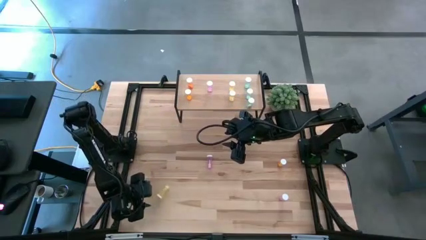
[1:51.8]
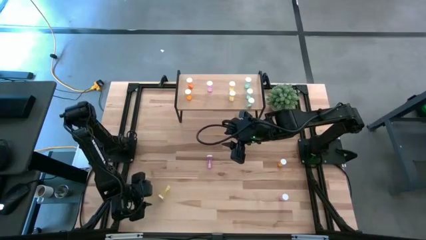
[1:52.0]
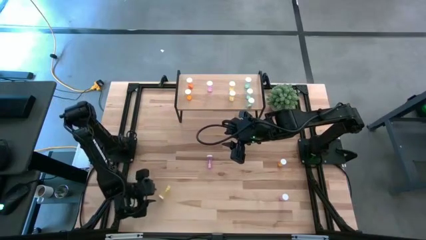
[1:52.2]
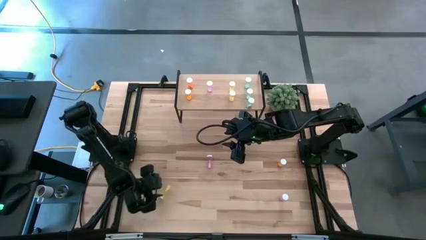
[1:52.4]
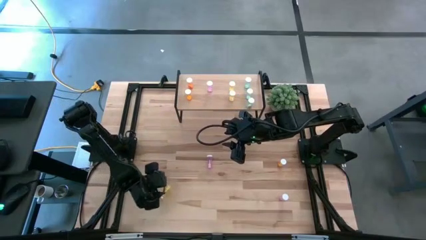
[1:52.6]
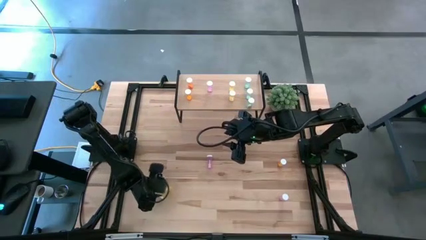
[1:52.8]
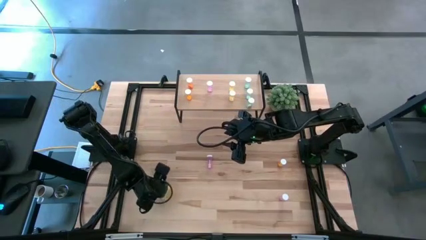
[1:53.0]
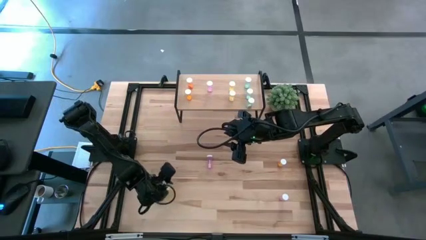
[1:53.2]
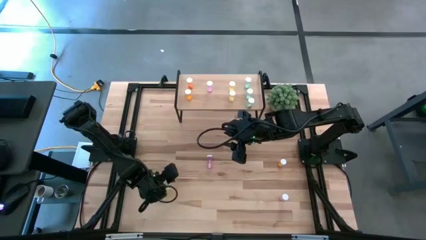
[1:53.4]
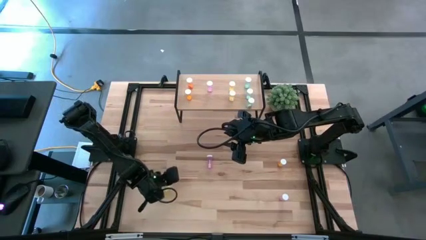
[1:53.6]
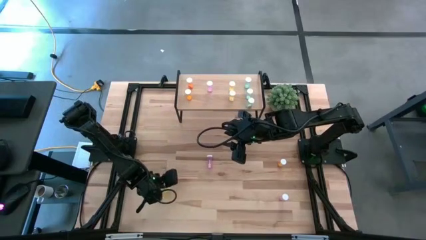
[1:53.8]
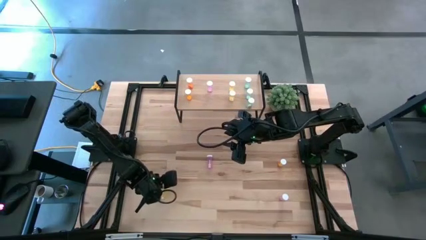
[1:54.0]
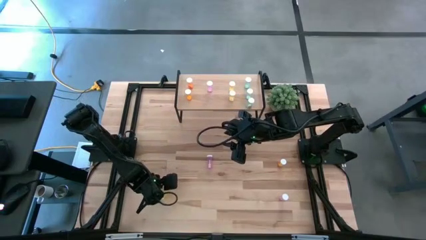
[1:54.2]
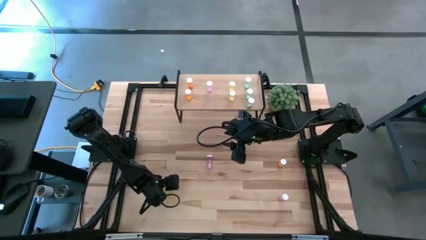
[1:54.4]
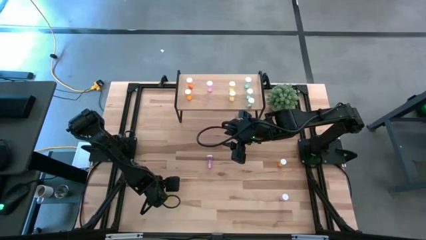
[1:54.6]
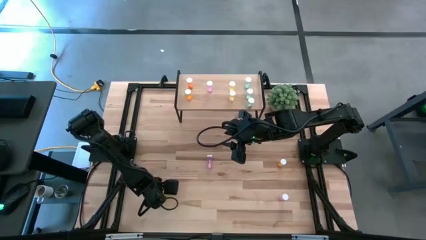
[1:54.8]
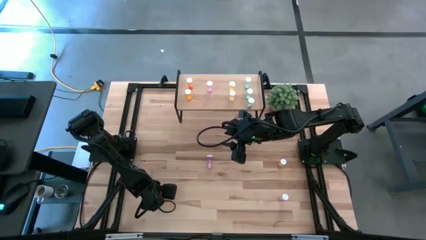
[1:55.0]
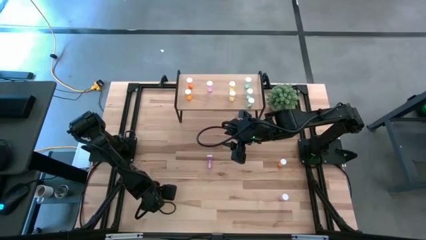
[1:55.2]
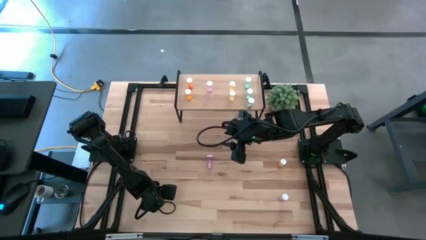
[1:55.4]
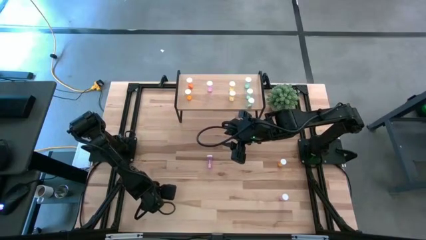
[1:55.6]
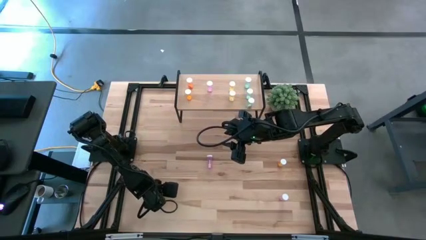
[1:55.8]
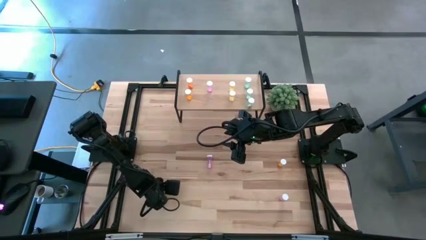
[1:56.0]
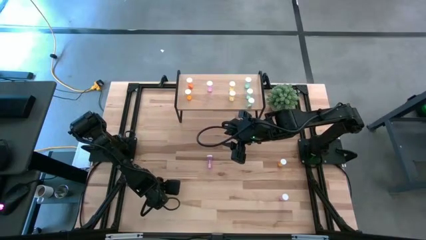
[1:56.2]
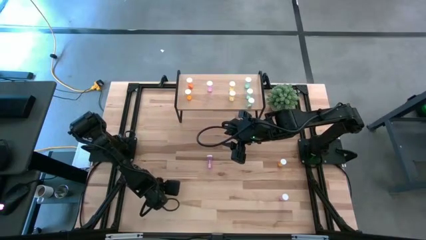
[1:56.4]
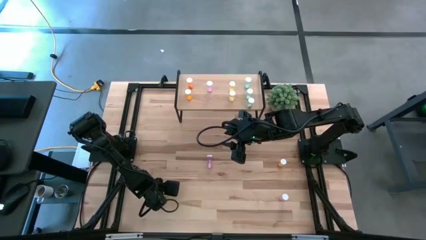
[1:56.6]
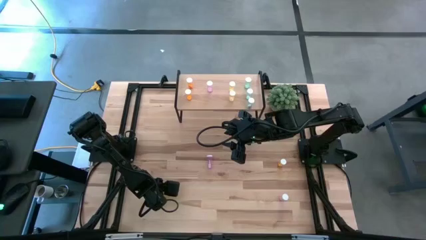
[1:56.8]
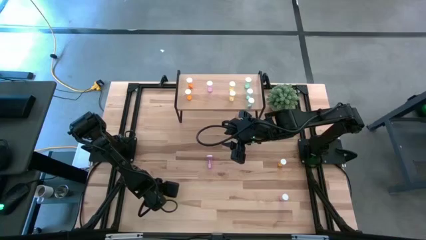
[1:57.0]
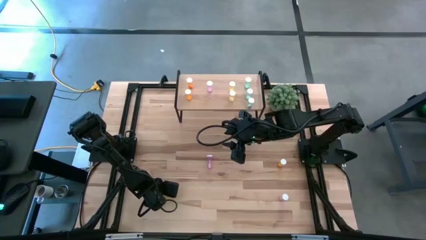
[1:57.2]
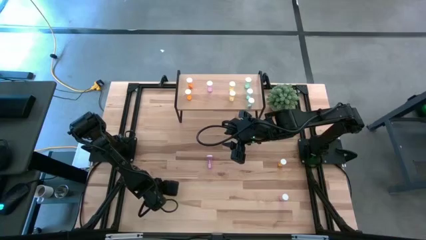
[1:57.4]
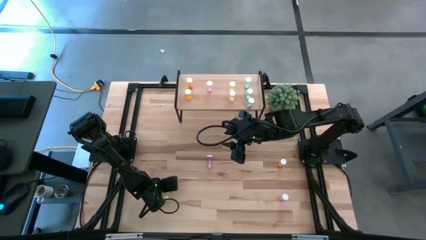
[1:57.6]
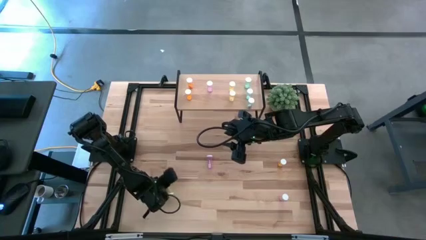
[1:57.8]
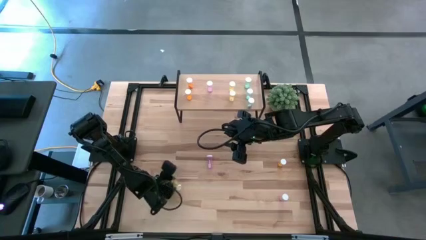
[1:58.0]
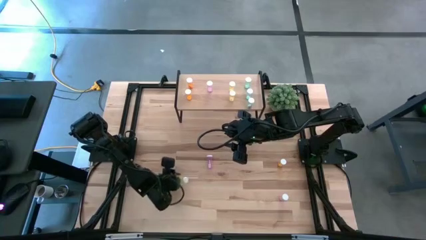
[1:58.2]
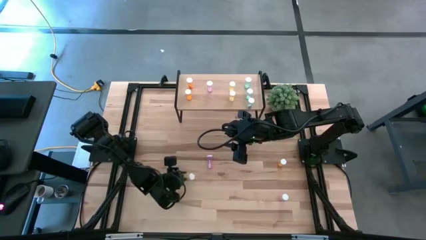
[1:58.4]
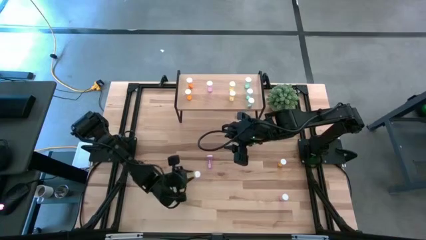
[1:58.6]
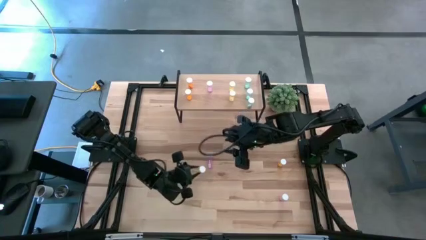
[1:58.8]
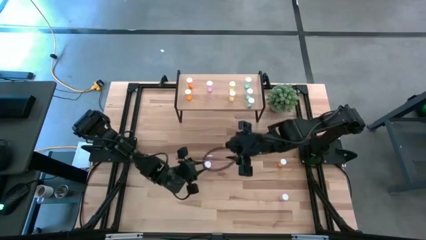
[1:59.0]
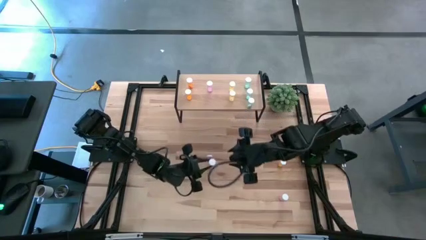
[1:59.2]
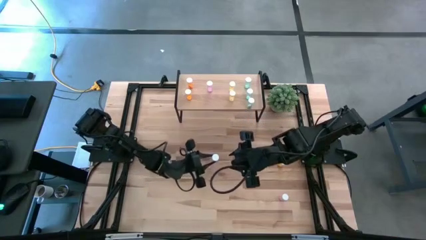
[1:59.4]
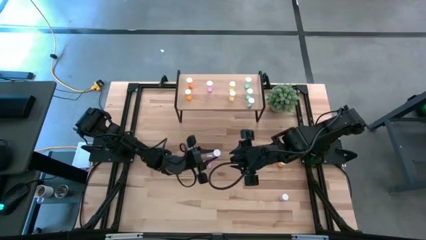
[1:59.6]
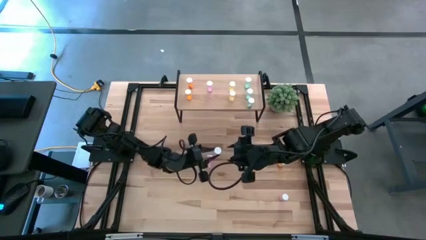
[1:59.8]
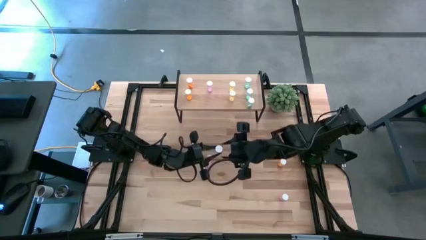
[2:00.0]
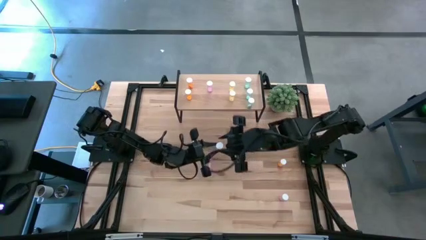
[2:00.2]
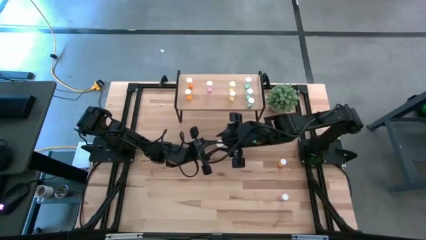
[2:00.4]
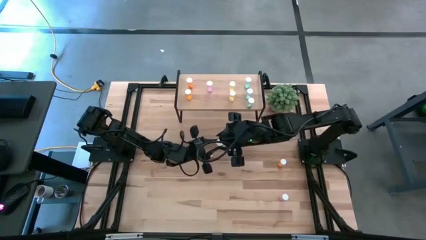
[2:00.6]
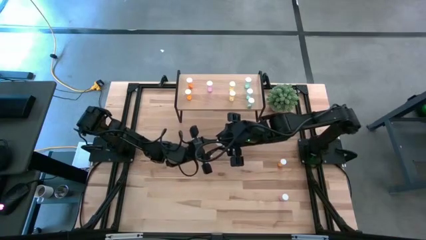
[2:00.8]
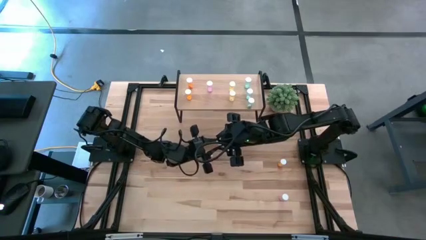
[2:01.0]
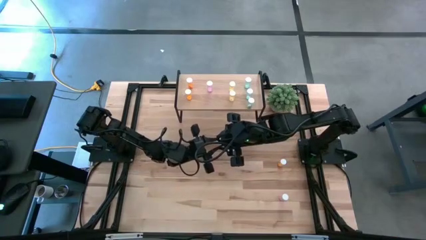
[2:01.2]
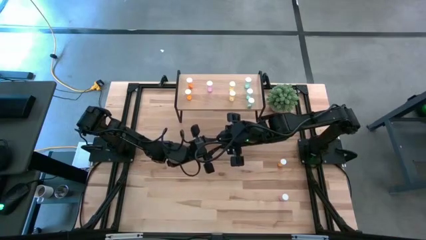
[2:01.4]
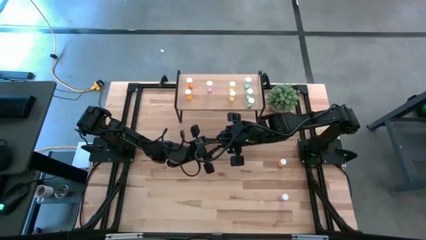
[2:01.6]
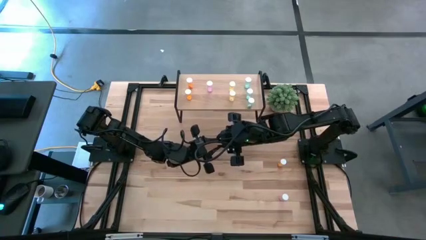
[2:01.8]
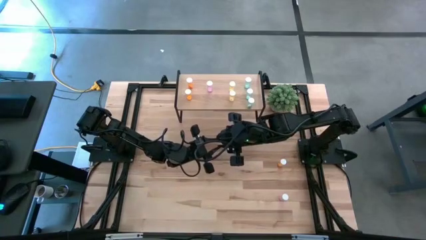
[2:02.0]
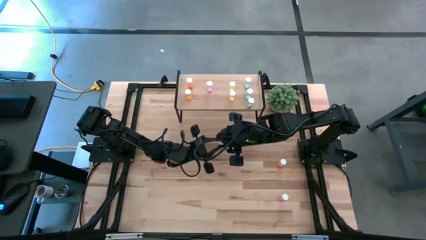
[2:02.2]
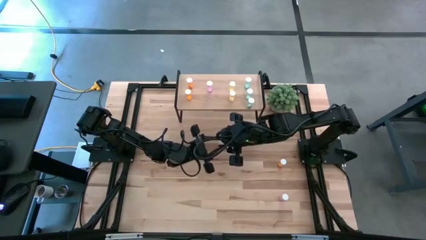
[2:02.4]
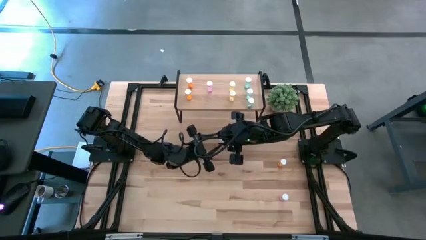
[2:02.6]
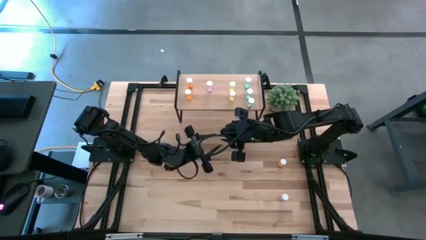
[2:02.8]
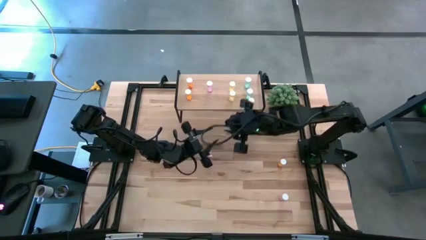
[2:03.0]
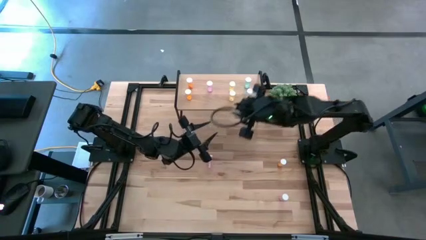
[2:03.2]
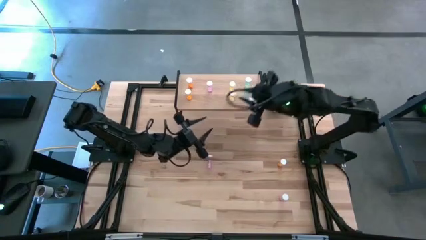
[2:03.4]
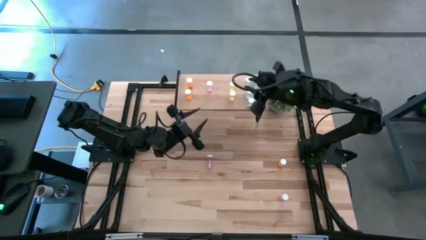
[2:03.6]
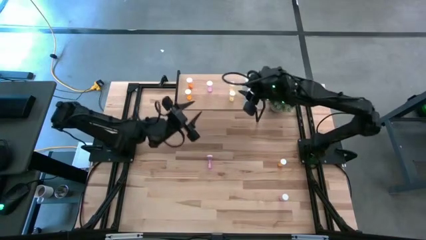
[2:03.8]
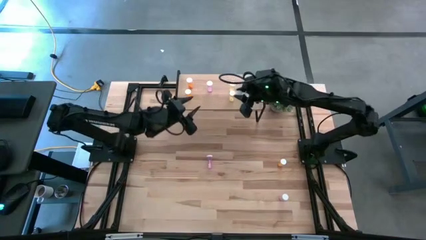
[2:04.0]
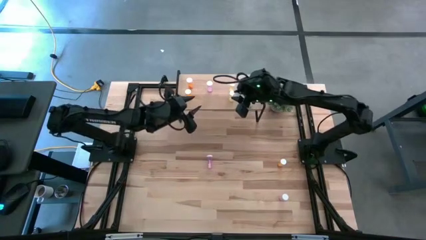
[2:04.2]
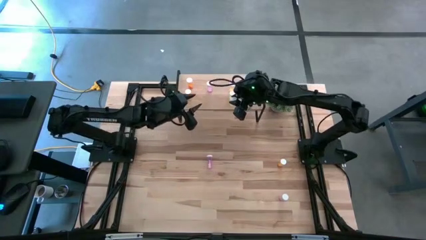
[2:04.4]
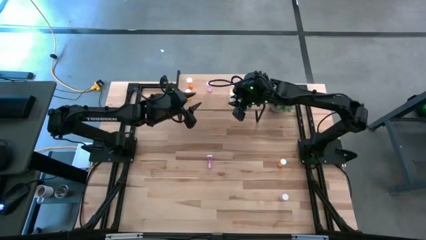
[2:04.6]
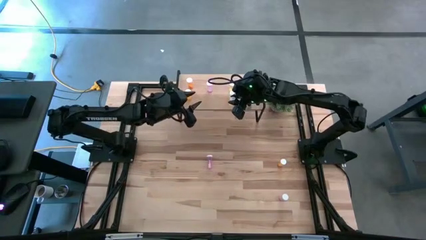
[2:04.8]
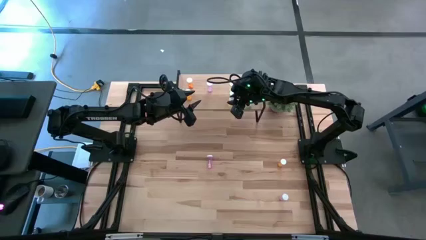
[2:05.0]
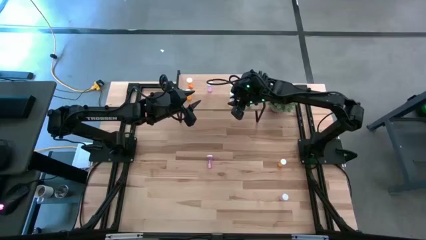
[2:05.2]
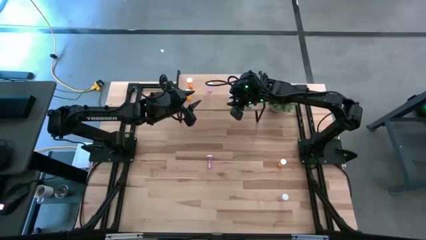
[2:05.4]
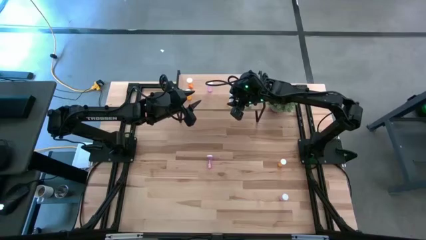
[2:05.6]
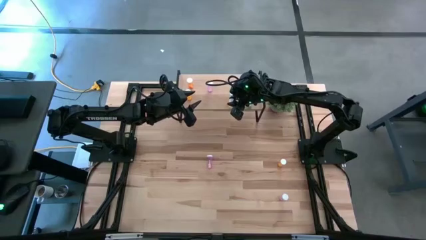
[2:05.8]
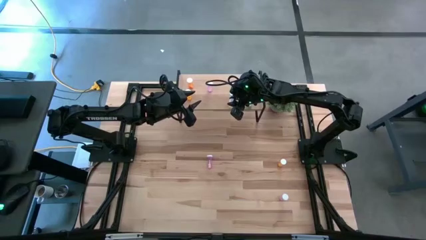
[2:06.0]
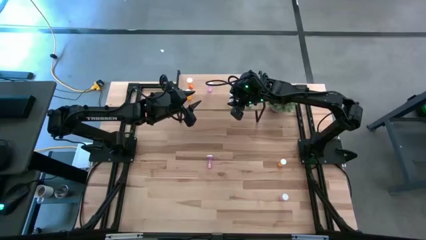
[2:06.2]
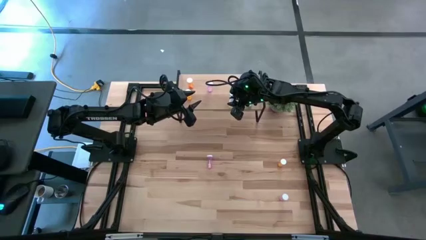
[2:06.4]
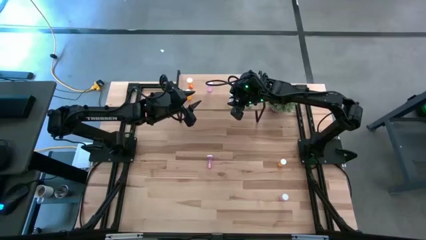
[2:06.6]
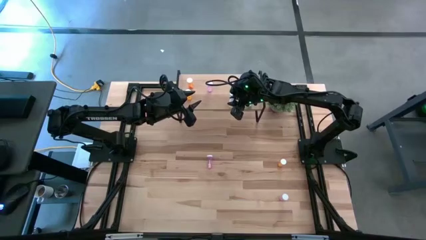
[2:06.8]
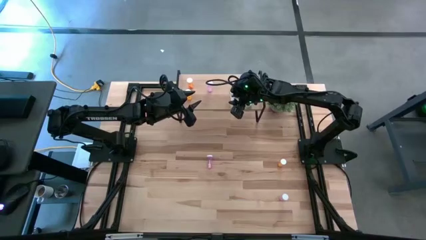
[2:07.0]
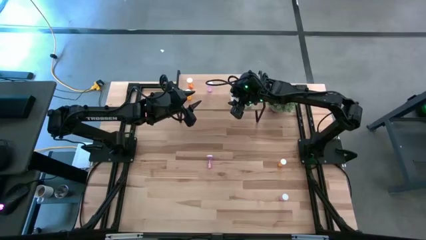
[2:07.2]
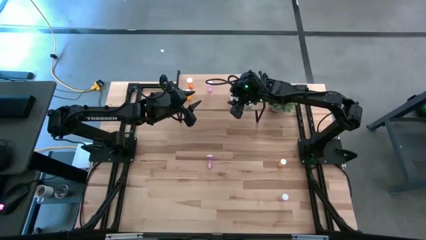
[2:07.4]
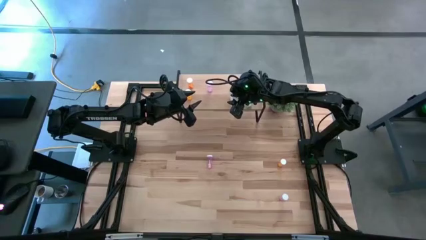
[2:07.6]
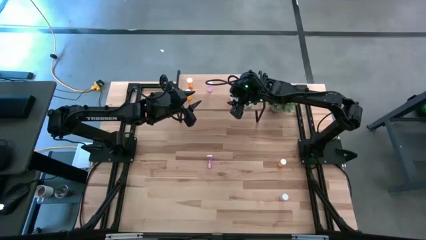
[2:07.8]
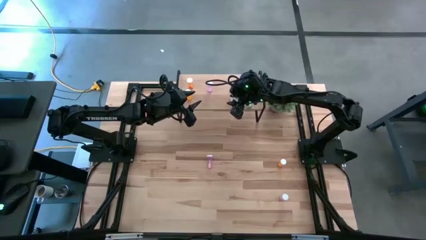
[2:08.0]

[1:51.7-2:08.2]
Task: Pick and place medicine bottles onto shelf by color
Put the yellow pill bottle on the shelf aligned with the other yellow pill bottles
